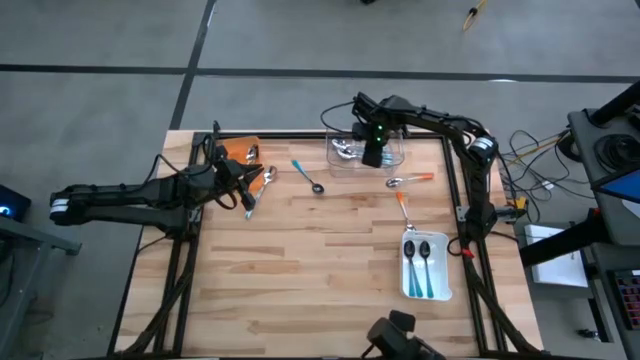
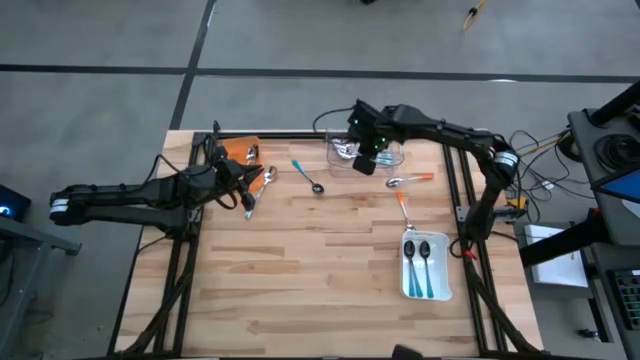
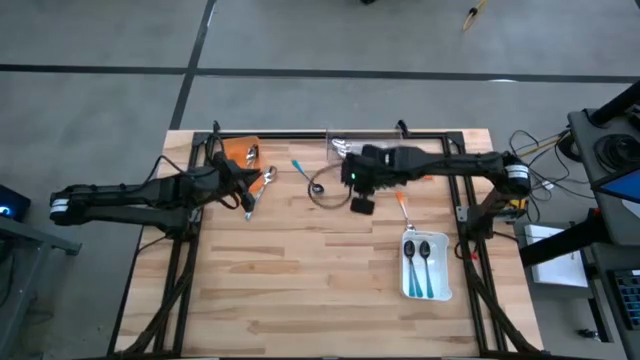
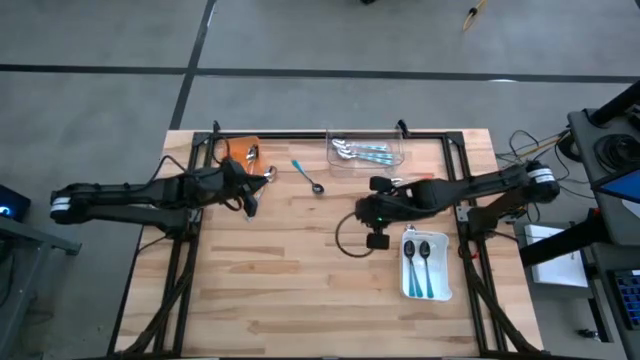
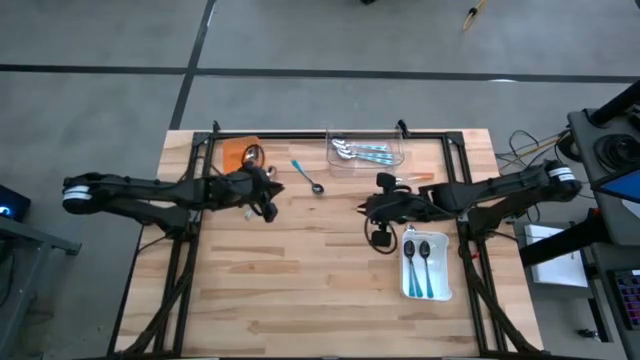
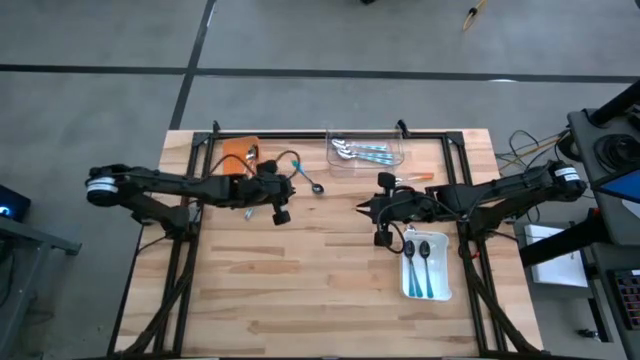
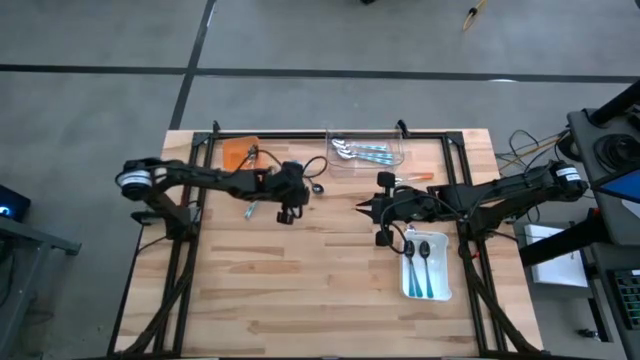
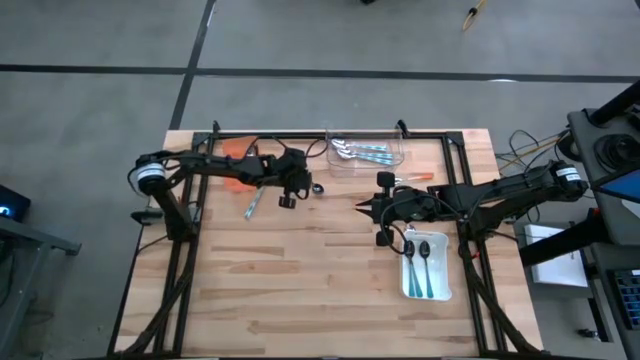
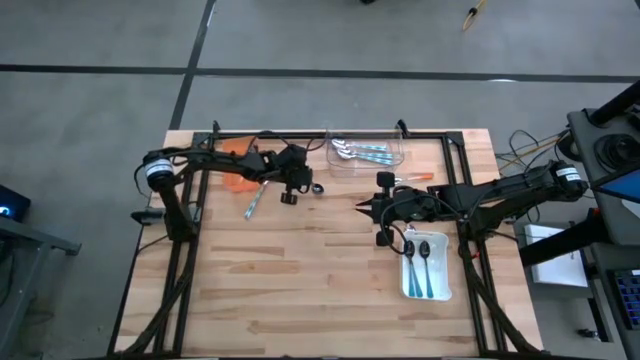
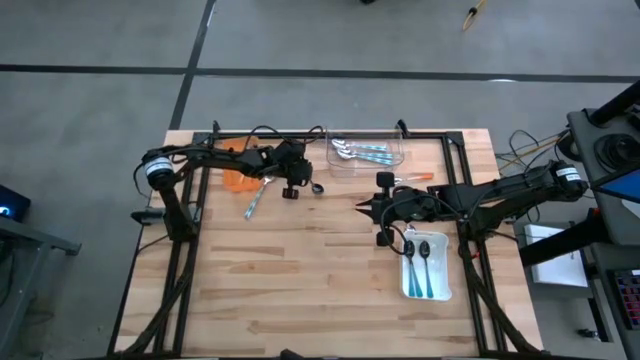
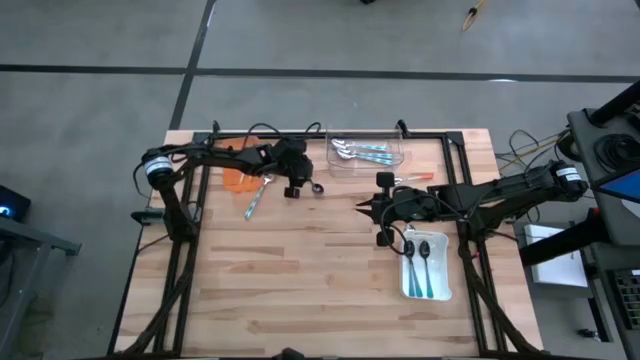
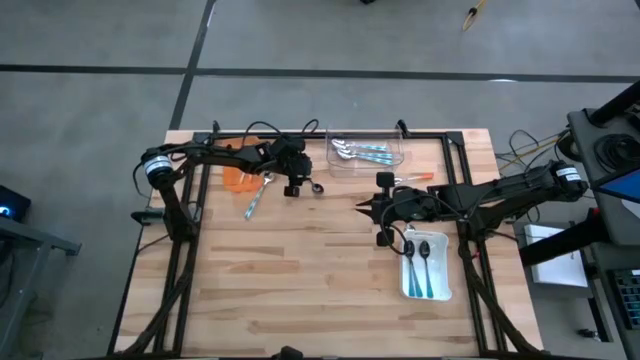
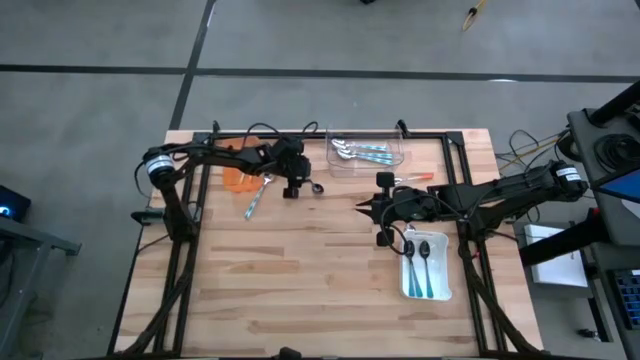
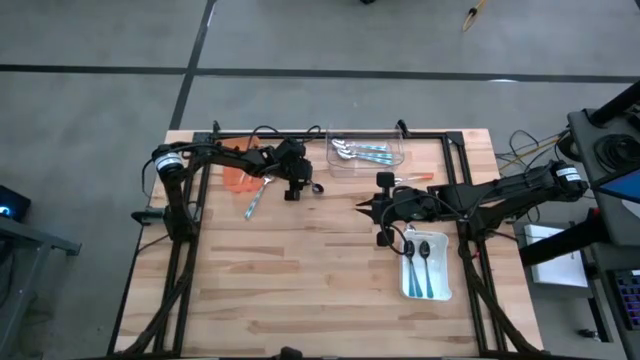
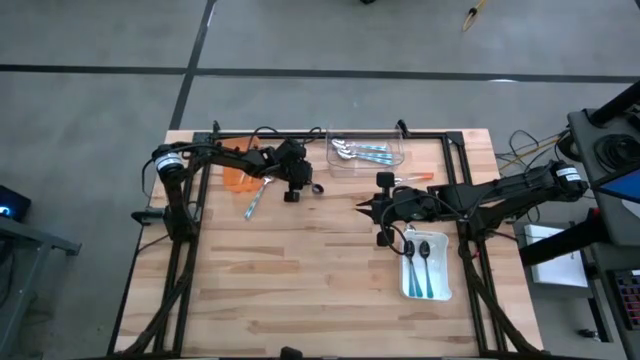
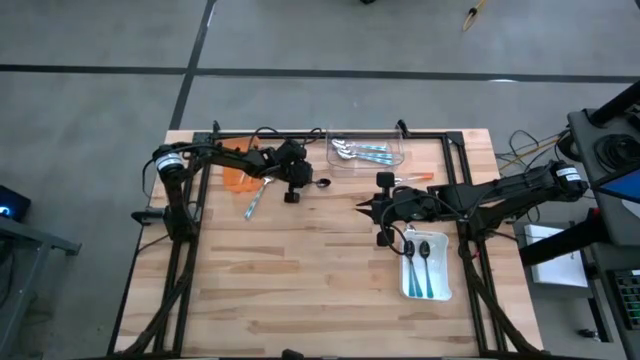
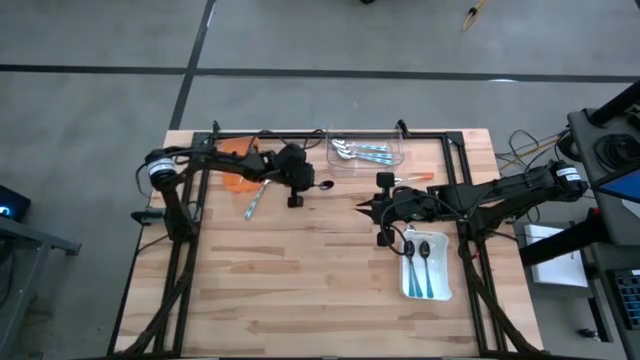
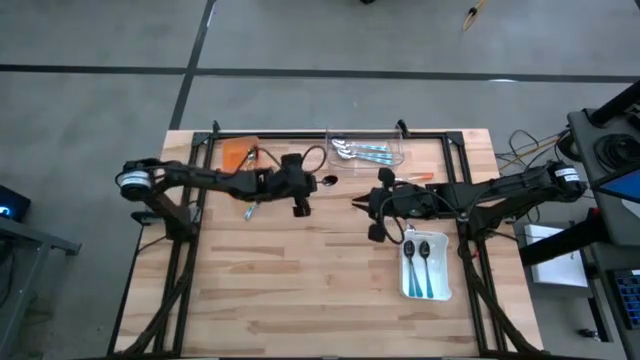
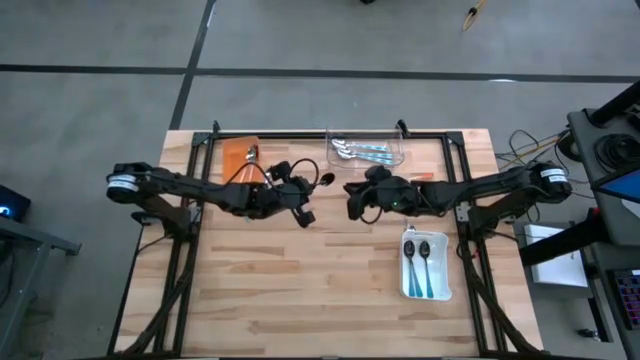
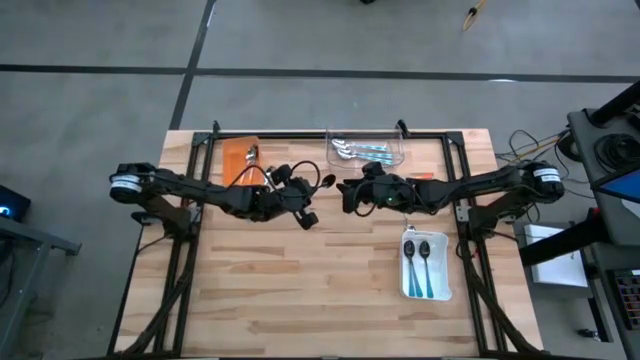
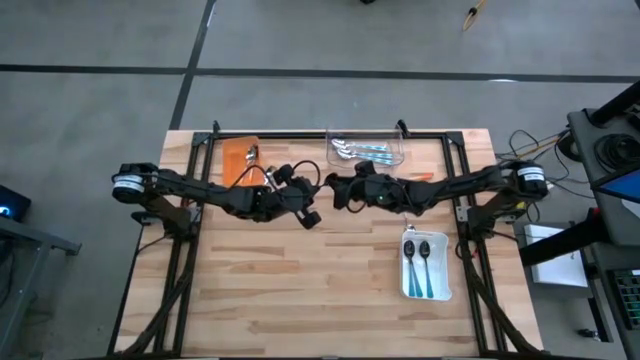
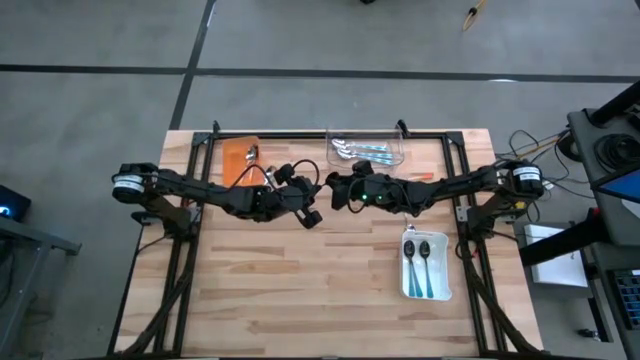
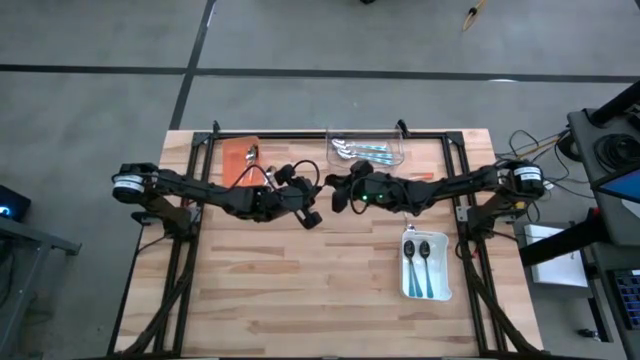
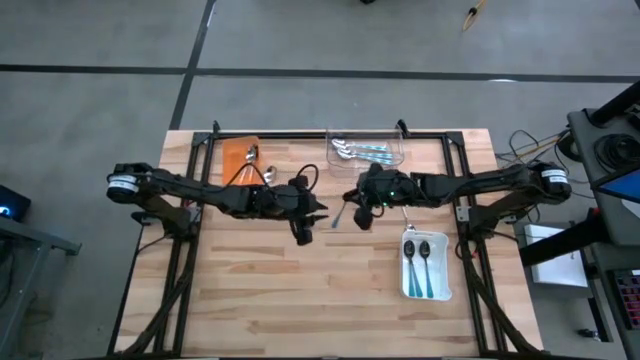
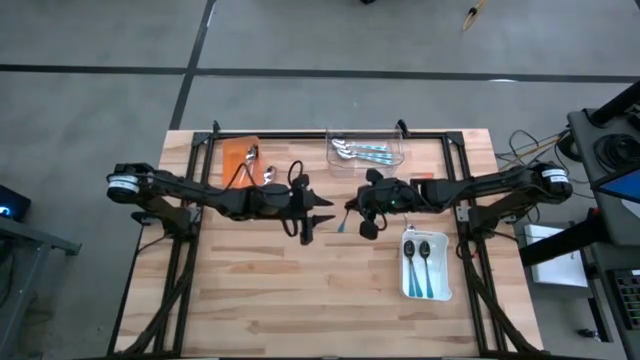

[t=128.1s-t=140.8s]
Task: Sort silverware by color (type)
Put the blue spoon into the white bin

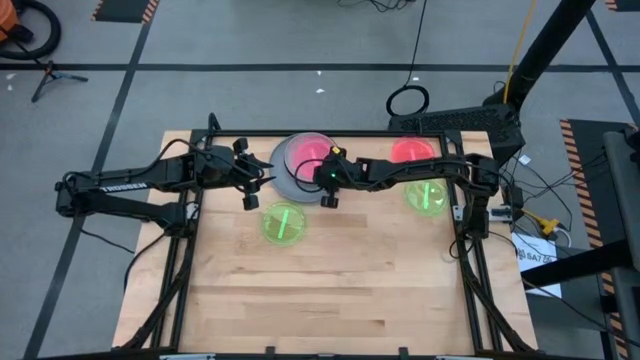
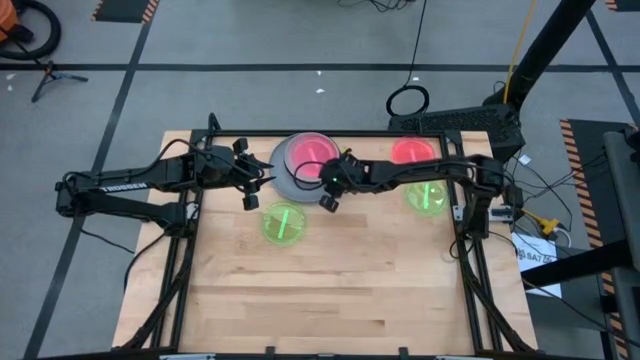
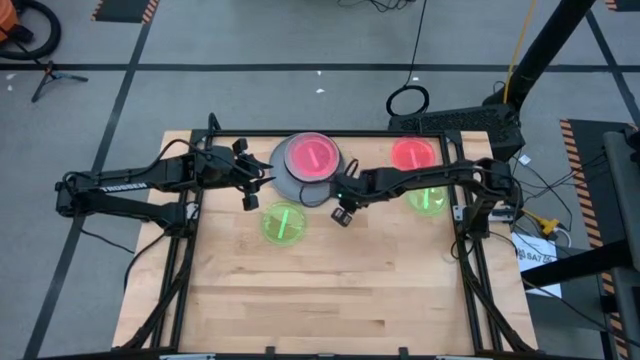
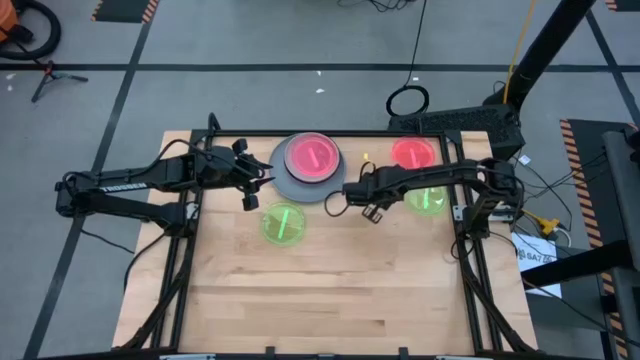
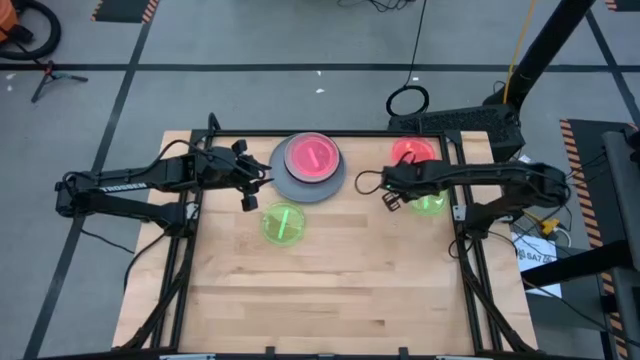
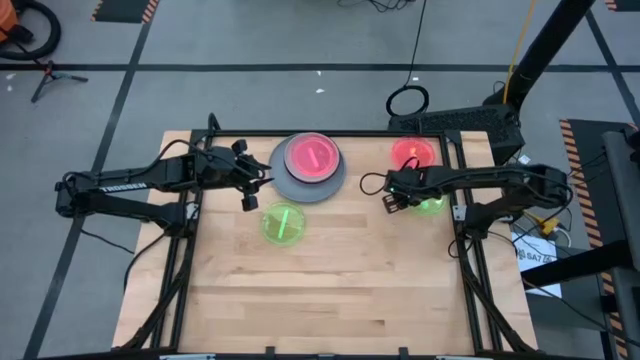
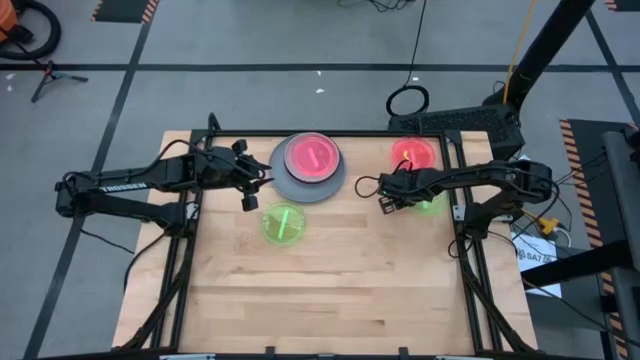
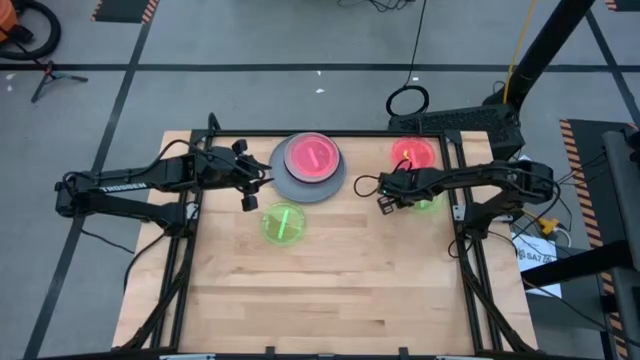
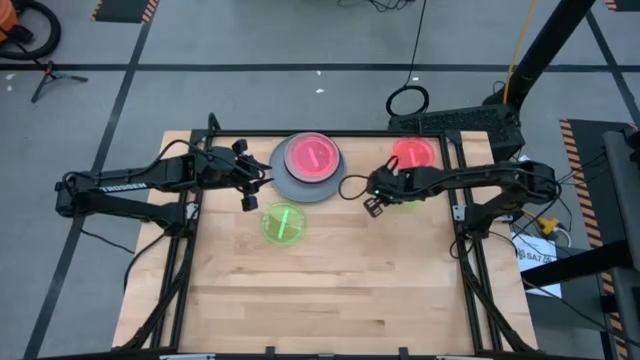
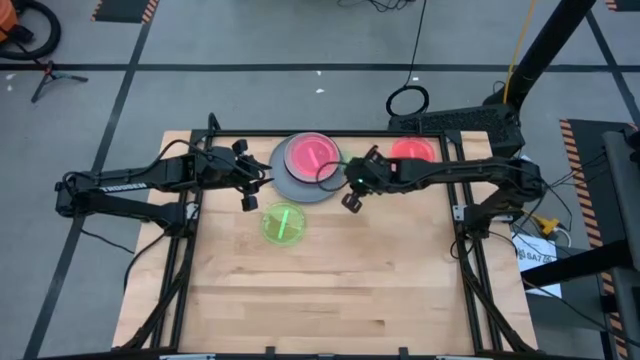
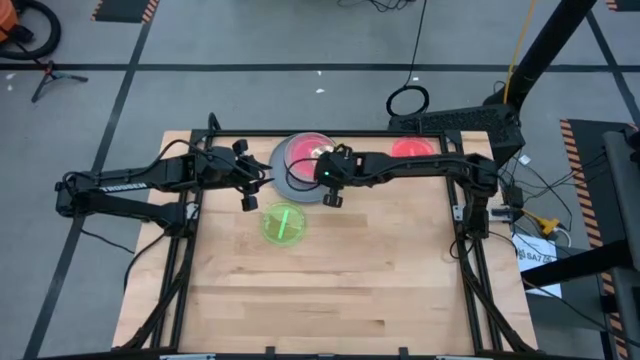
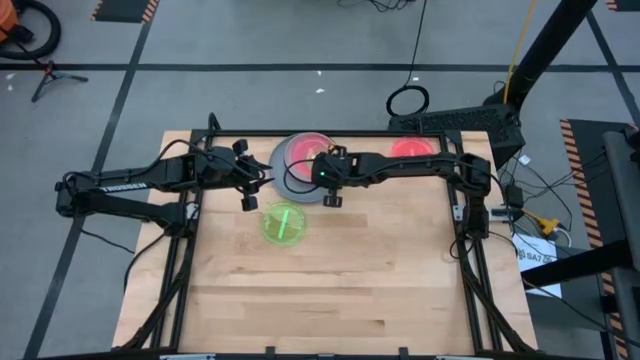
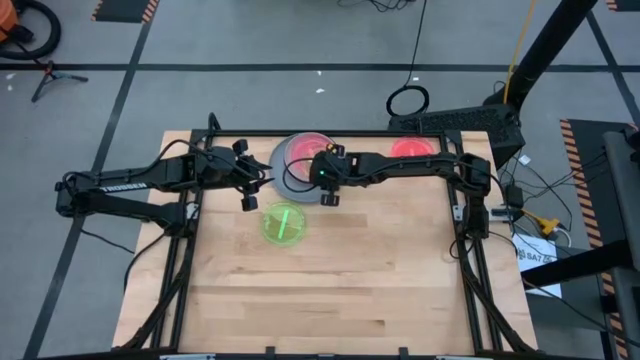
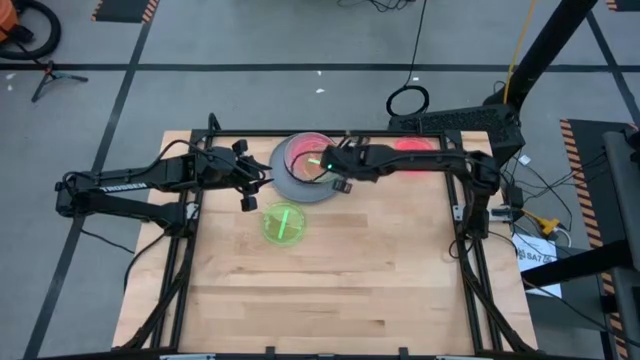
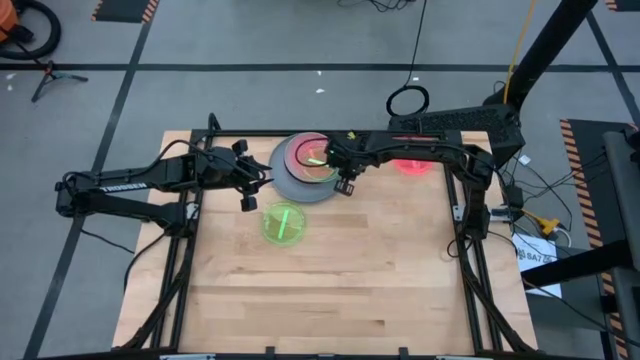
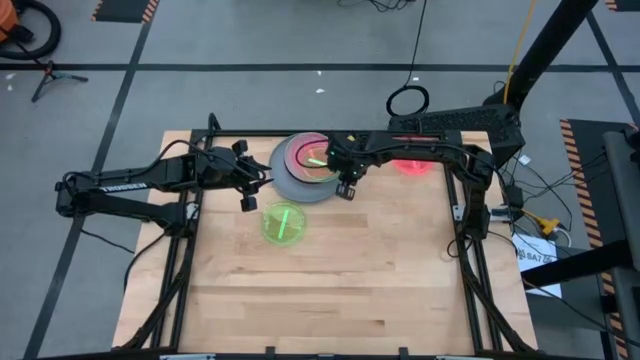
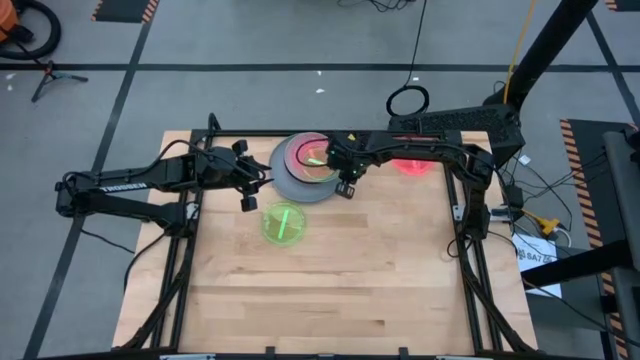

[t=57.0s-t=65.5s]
Task: Stack plastic plates
Stack the right green plate on top of the pink plate
